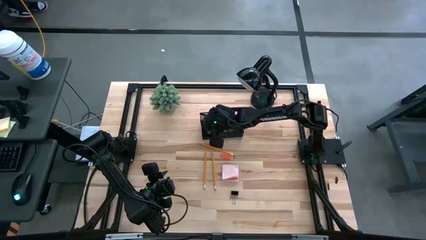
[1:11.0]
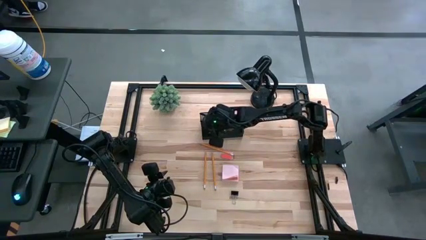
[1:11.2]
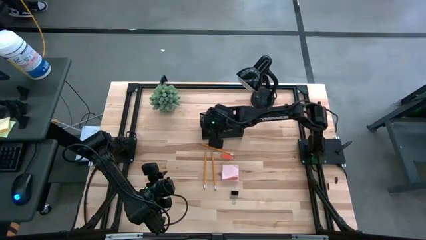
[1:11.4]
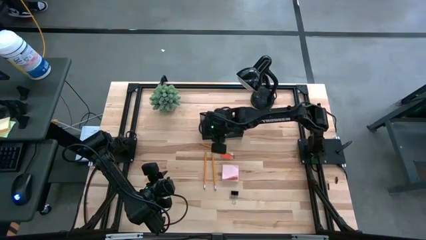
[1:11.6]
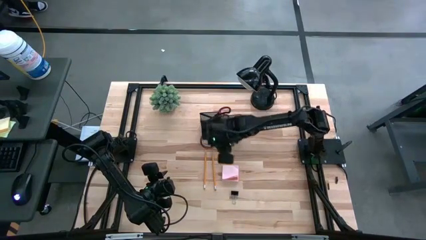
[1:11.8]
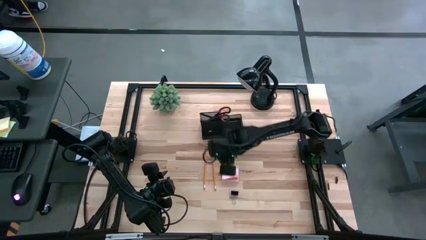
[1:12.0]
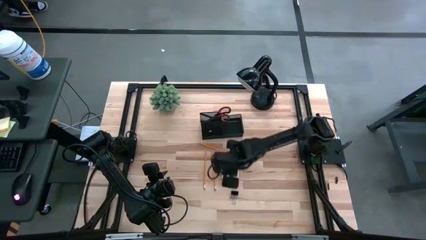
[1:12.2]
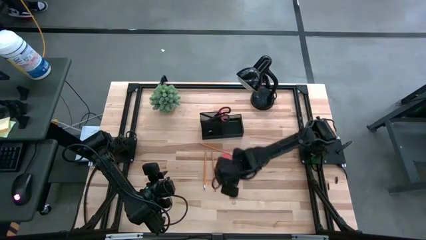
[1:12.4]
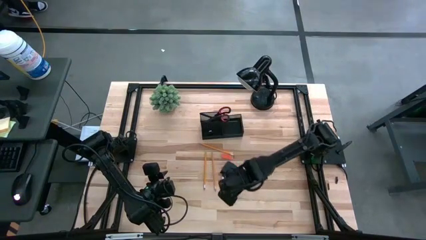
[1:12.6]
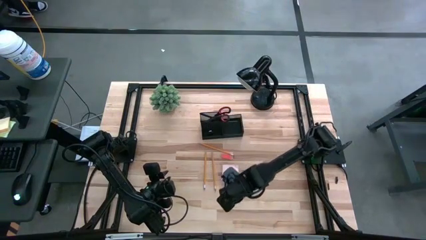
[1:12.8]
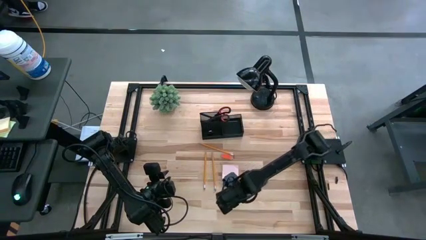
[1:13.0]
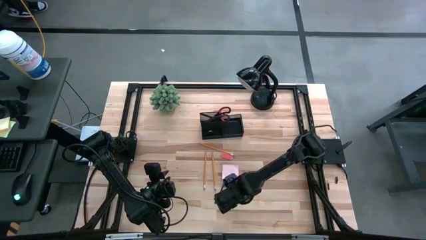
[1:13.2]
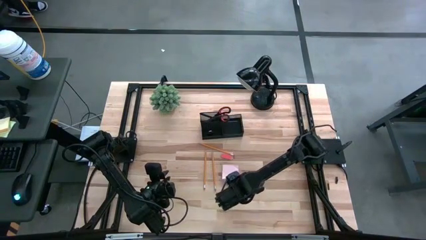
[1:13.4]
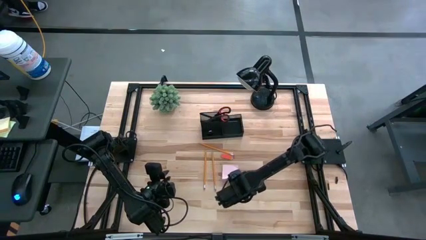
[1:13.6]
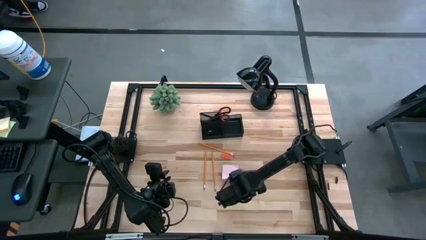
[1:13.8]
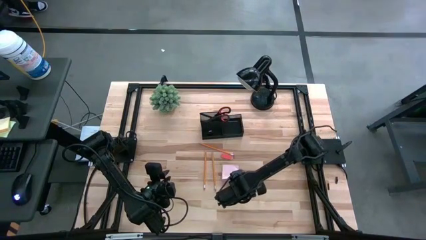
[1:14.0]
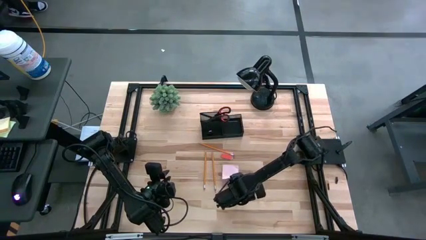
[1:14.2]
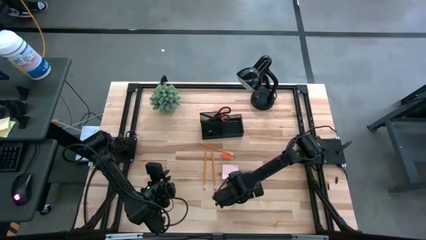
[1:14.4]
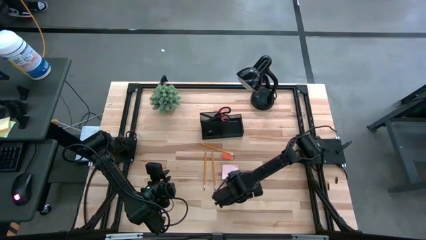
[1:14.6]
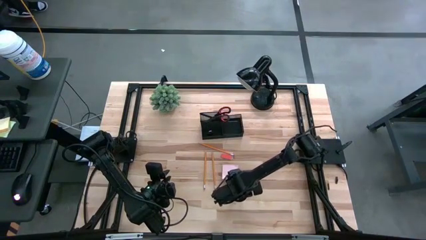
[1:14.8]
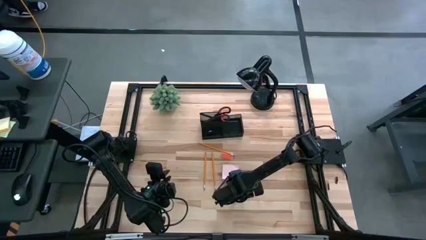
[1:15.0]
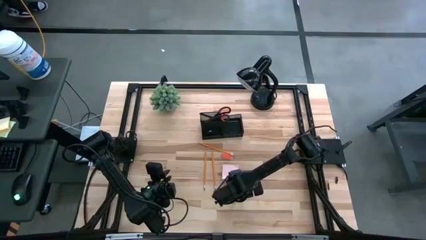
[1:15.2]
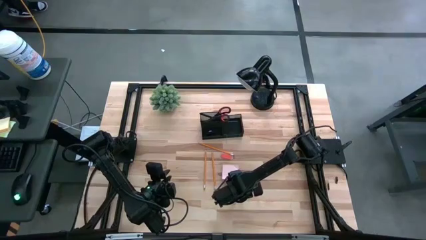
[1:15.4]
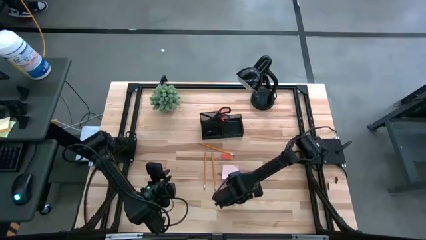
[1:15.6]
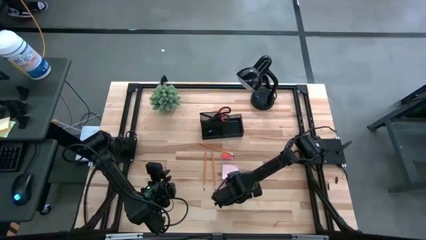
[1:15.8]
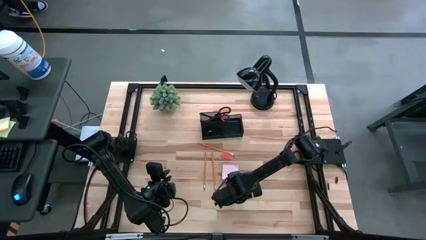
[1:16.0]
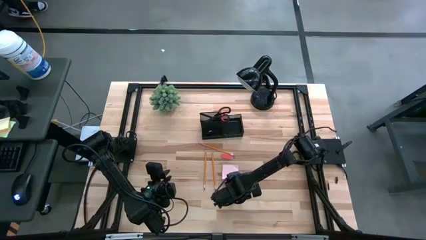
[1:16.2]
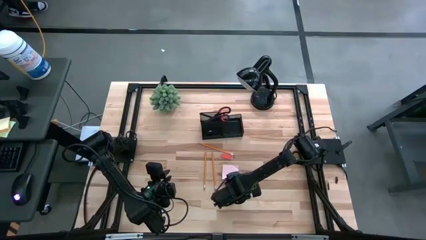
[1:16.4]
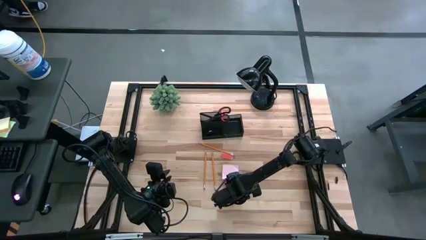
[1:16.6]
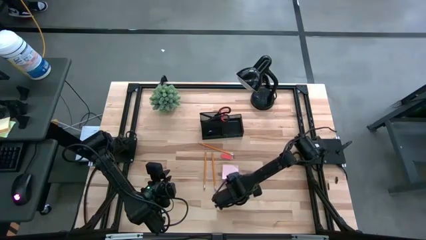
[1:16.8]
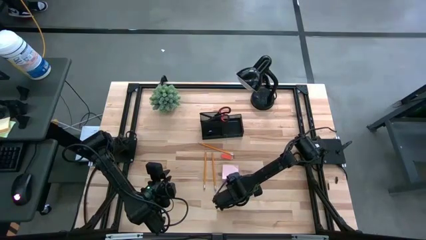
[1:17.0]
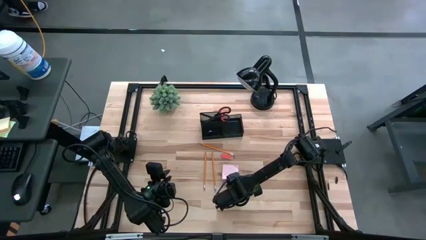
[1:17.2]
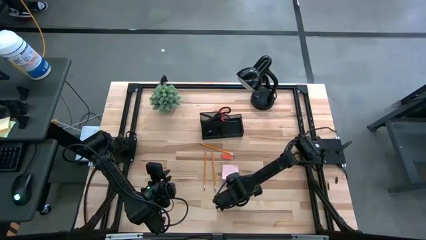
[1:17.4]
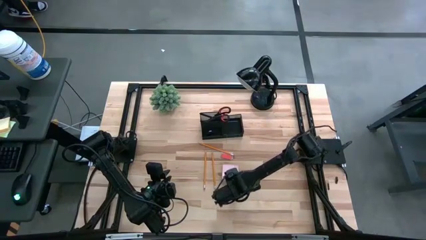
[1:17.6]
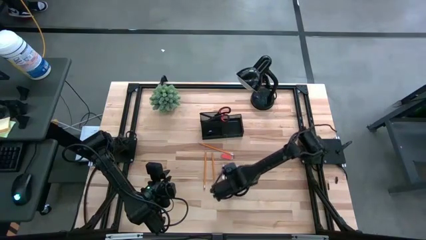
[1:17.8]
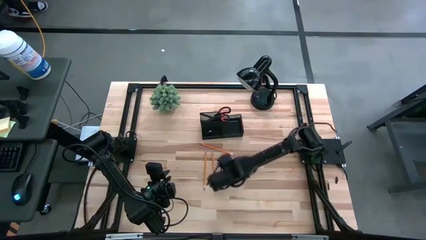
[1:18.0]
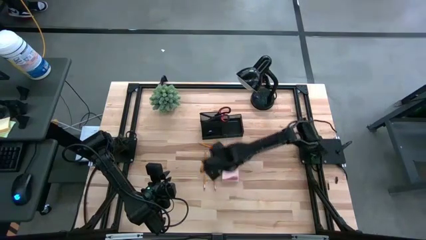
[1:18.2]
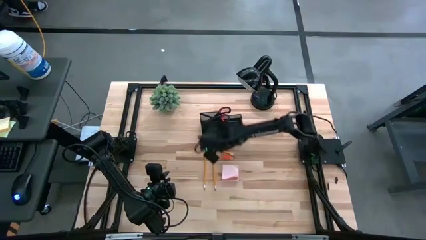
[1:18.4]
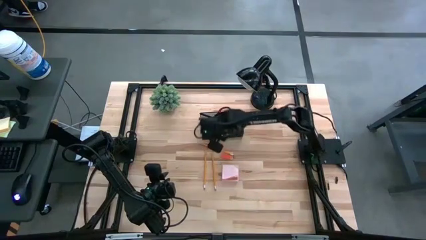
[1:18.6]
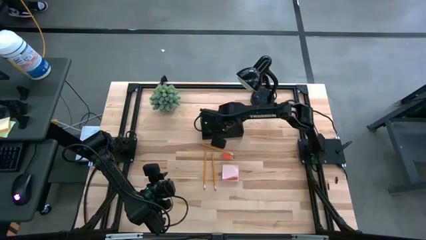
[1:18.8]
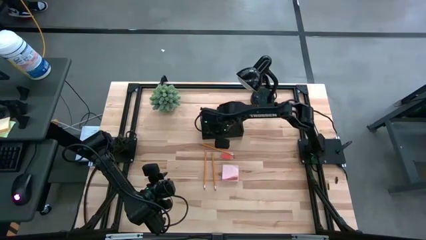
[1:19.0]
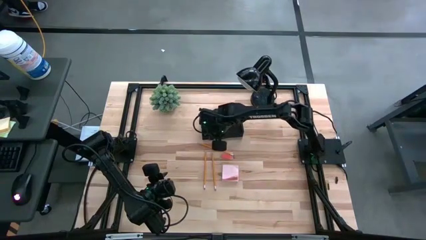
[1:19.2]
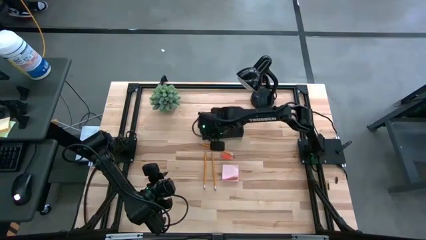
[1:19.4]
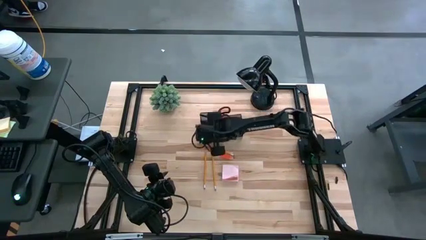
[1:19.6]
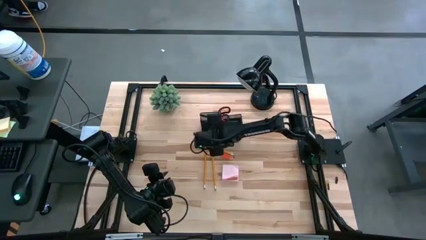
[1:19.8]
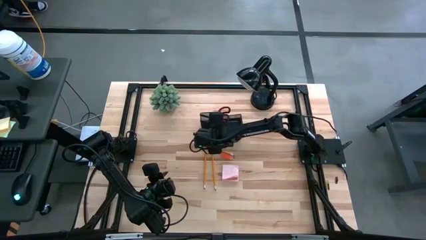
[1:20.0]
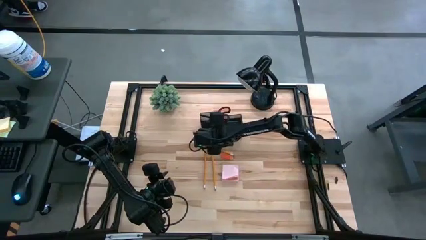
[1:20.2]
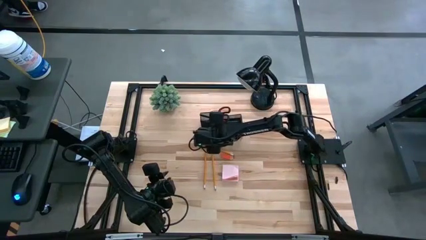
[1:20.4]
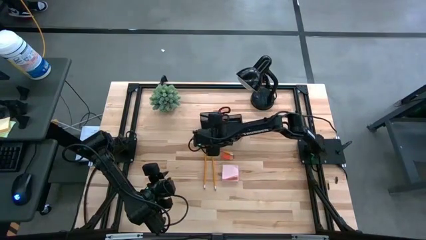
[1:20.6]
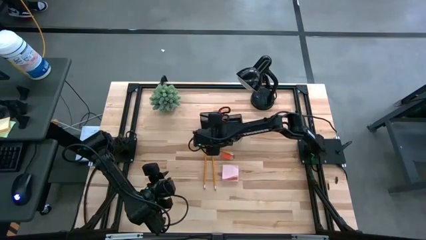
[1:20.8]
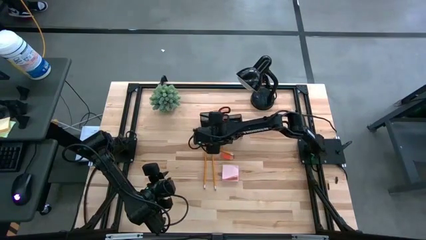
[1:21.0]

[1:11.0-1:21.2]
Task: Pick and place office supplies into organizer
Put the binder clip into the desk organizer

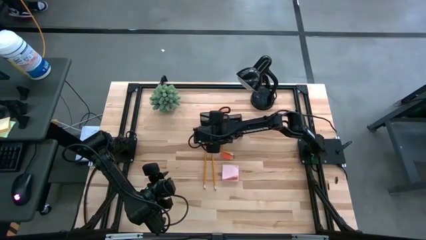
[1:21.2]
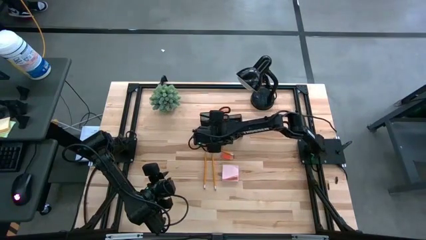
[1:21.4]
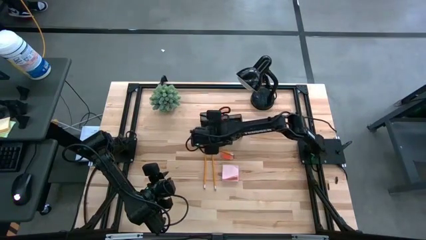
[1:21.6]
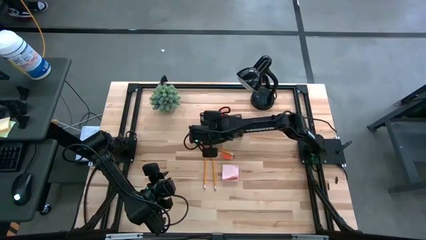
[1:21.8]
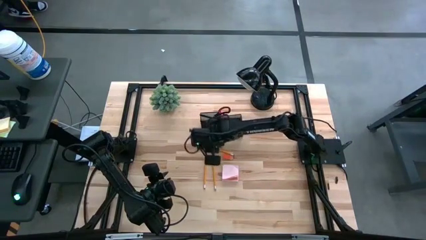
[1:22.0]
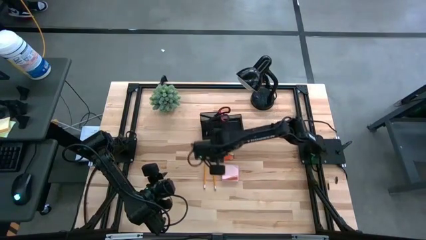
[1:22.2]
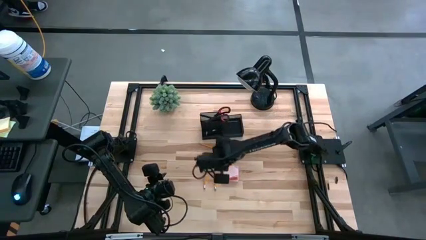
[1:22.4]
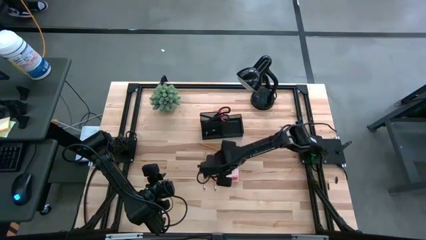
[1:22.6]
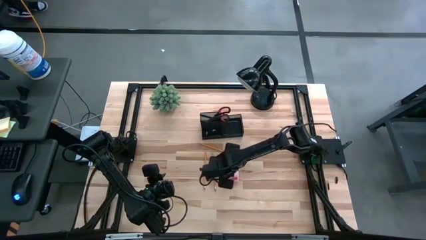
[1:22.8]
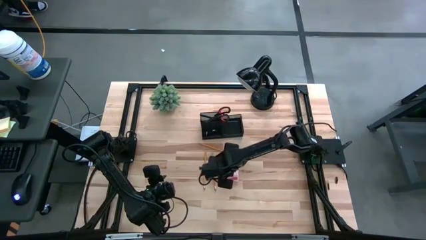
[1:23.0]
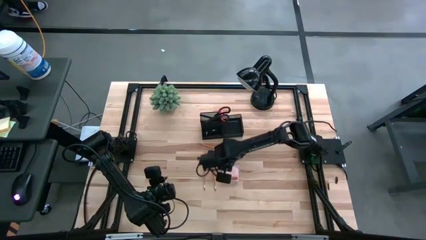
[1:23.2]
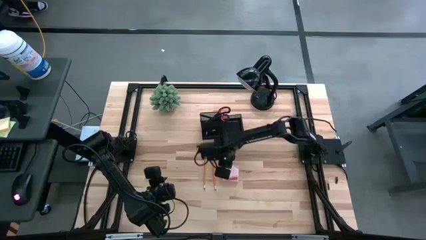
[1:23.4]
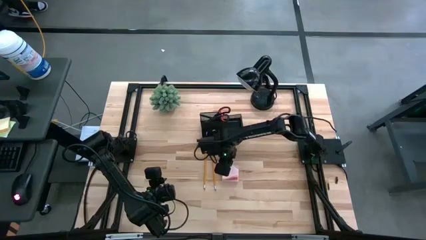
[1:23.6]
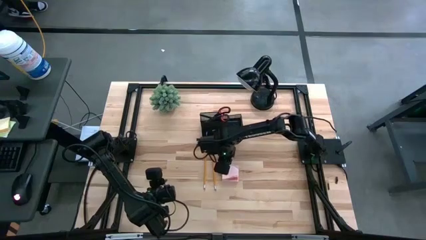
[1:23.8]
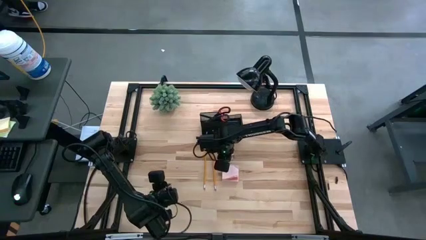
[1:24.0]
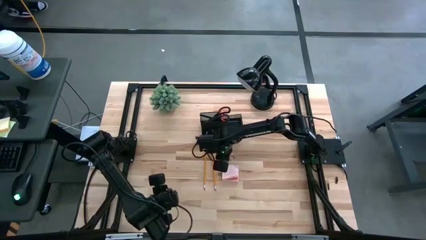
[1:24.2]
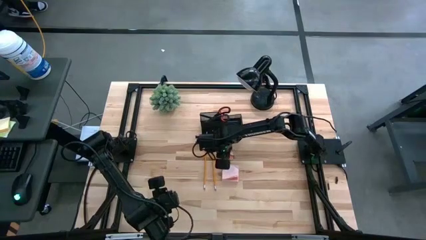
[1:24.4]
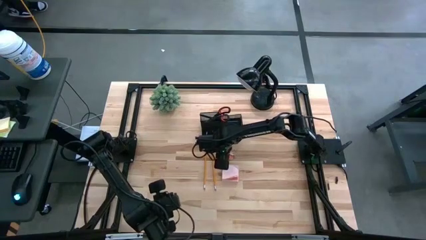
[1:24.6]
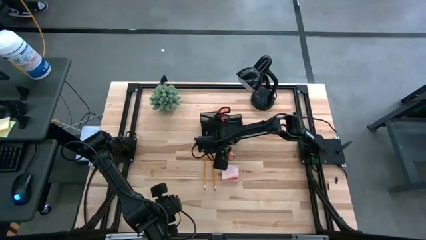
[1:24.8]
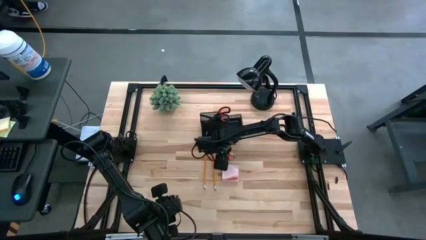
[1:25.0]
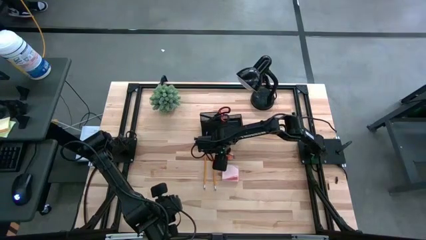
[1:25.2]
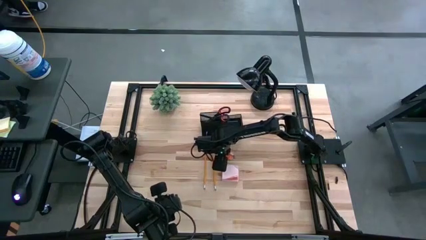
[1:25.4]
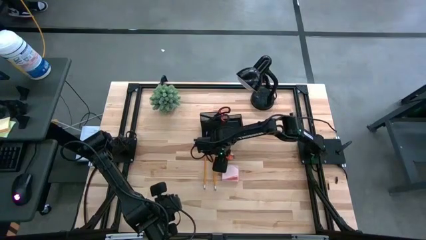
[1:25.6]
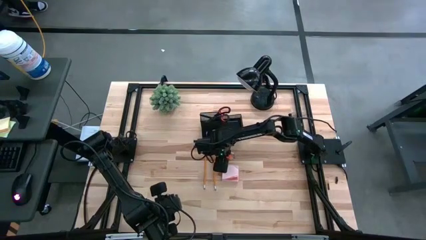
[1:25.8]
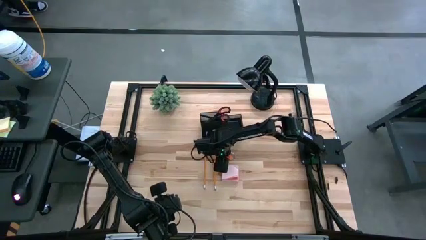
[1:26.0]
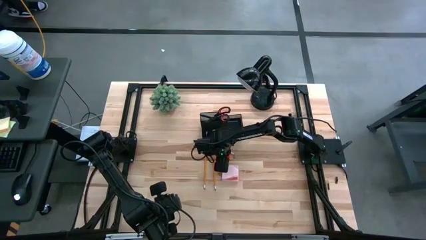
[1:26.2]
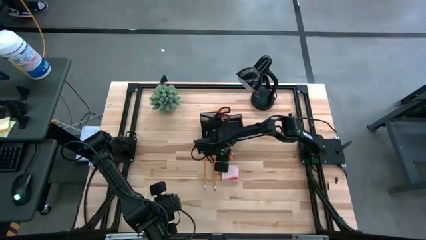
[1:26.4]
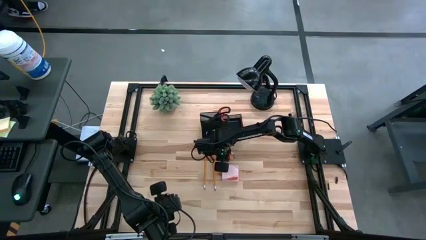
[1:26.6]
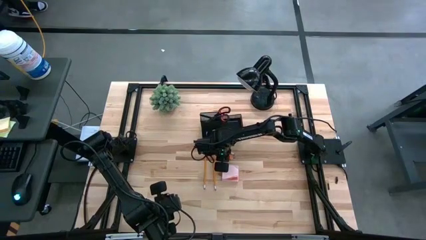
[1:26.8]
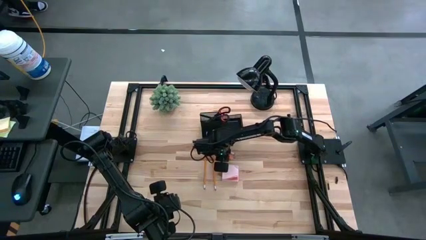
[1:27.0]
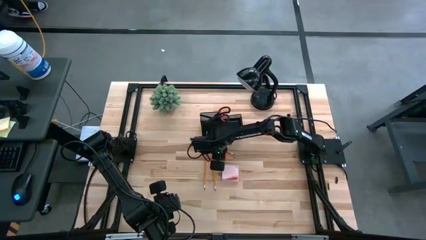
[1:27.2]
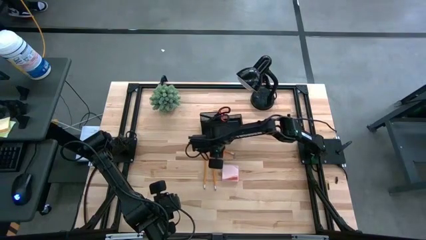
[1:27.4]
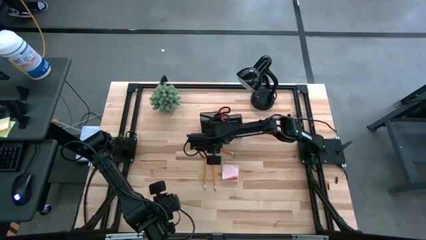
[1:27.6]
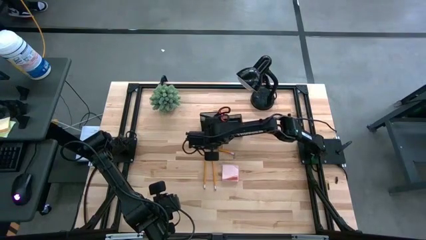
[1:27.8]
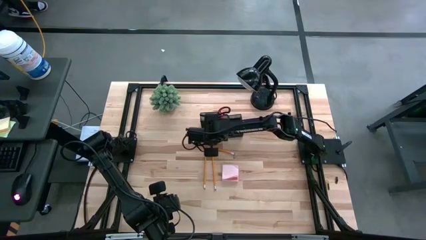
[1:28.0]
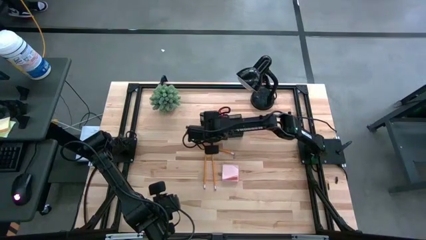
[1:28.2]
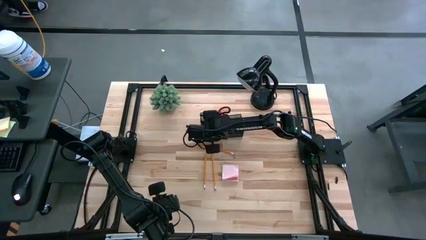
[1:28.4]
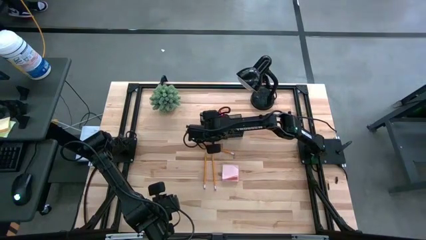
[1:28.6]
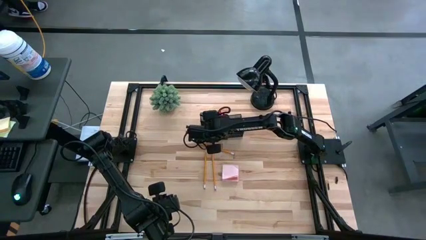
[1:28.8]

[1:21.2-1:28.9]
Put the eraser into the desk organizer
